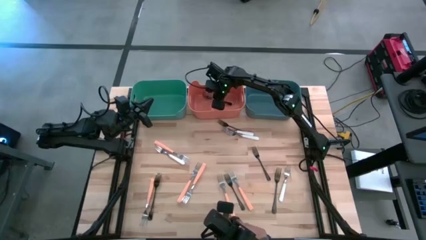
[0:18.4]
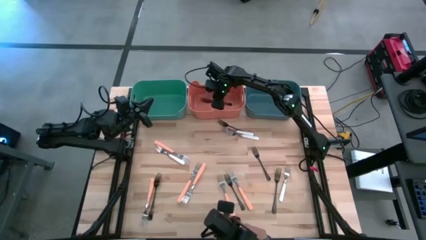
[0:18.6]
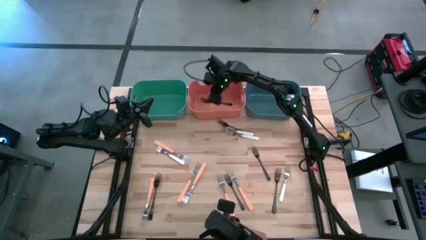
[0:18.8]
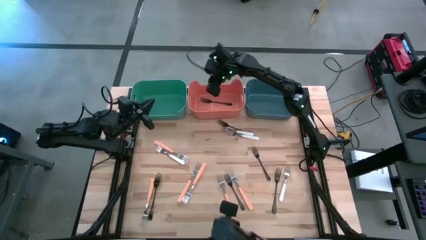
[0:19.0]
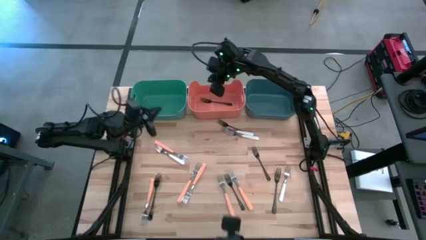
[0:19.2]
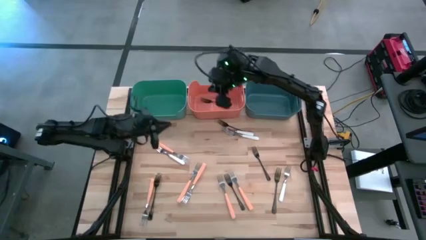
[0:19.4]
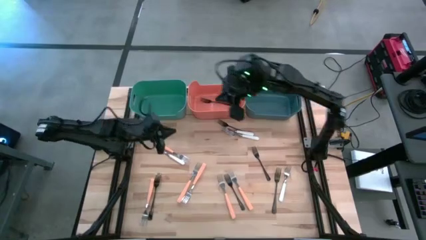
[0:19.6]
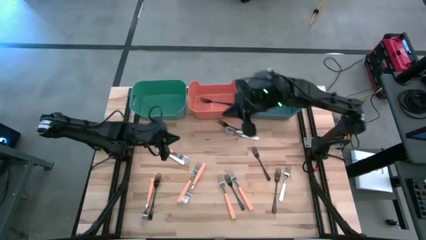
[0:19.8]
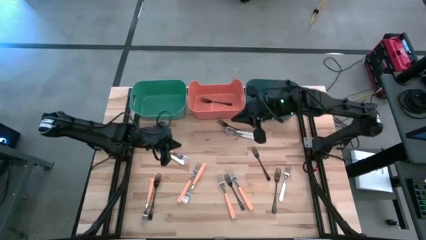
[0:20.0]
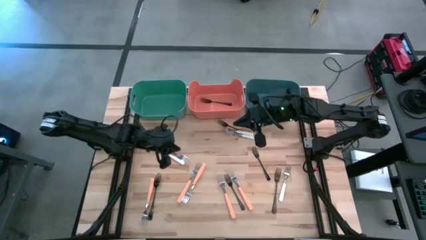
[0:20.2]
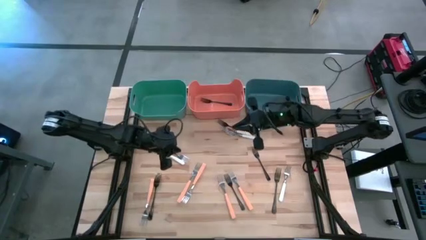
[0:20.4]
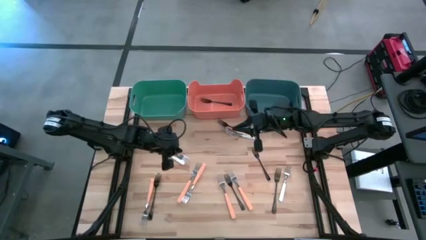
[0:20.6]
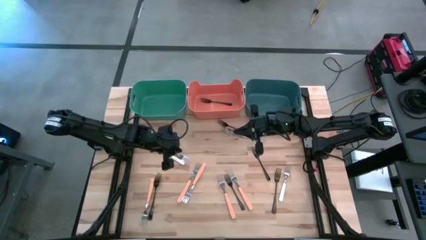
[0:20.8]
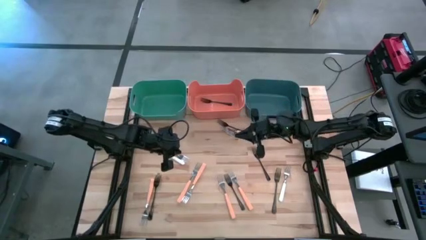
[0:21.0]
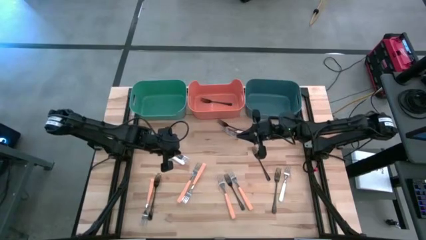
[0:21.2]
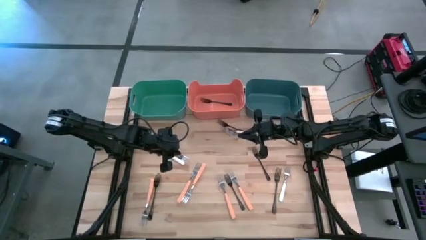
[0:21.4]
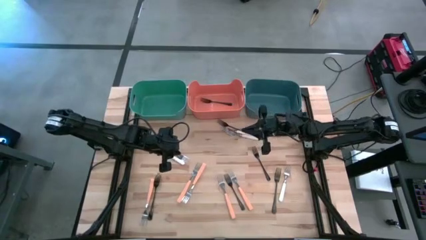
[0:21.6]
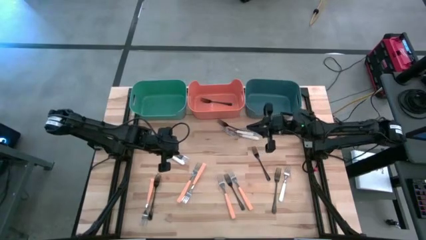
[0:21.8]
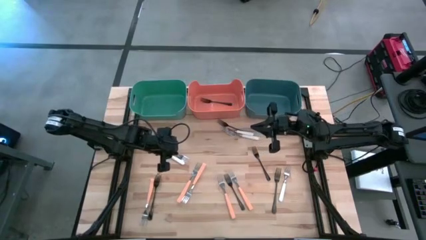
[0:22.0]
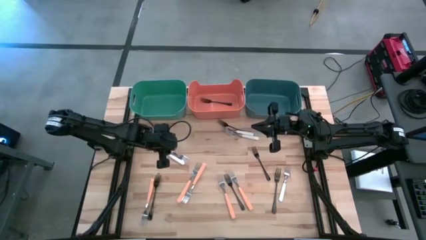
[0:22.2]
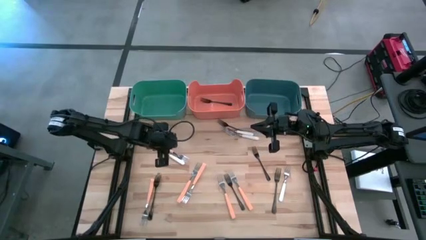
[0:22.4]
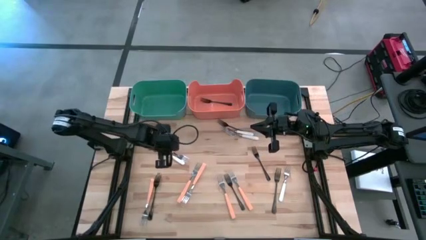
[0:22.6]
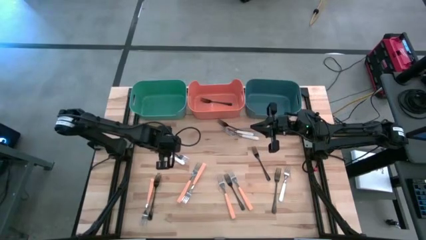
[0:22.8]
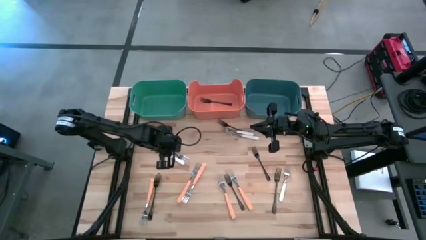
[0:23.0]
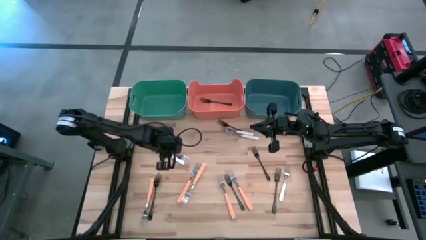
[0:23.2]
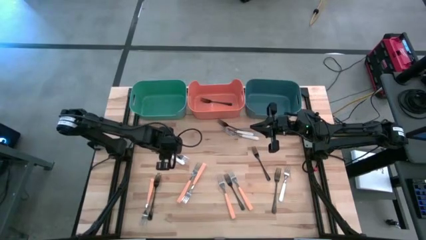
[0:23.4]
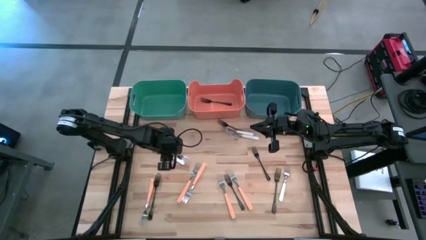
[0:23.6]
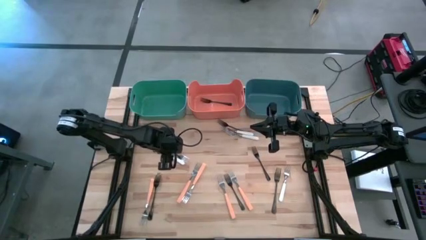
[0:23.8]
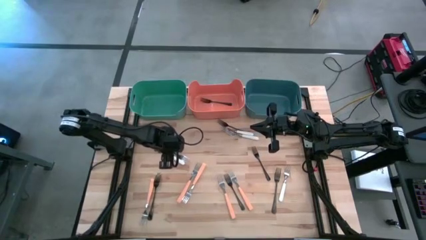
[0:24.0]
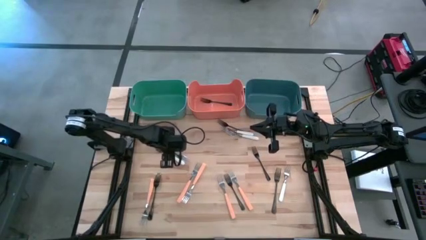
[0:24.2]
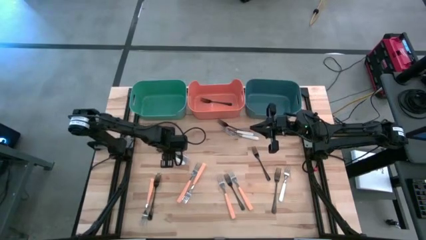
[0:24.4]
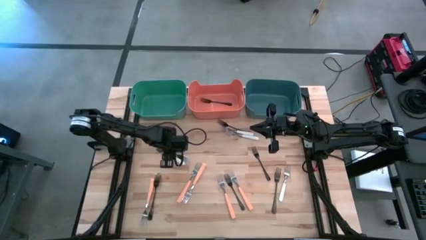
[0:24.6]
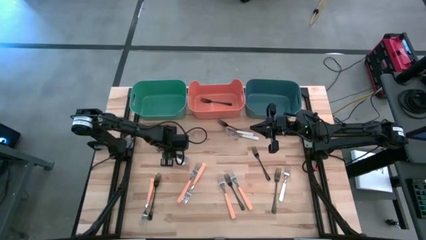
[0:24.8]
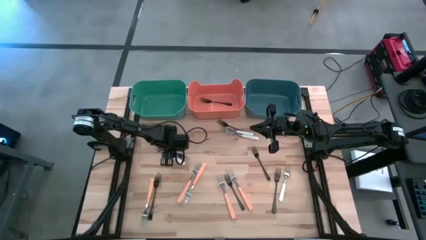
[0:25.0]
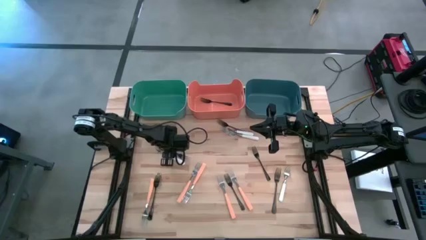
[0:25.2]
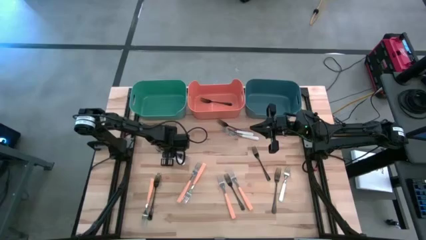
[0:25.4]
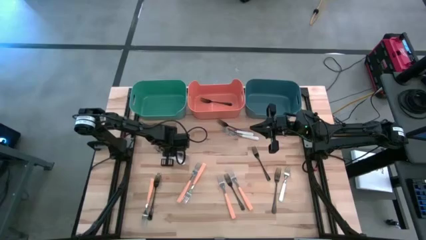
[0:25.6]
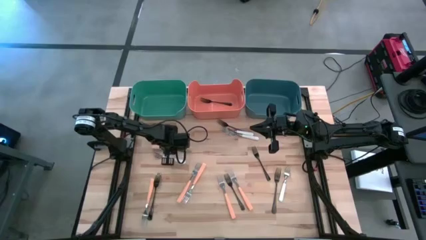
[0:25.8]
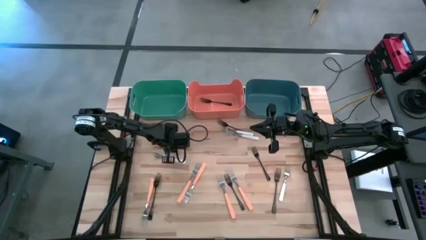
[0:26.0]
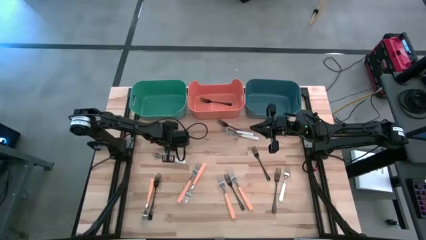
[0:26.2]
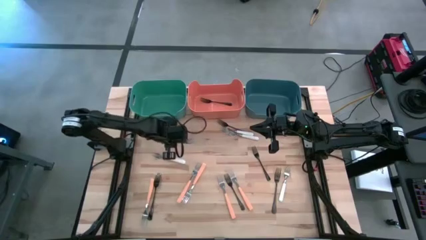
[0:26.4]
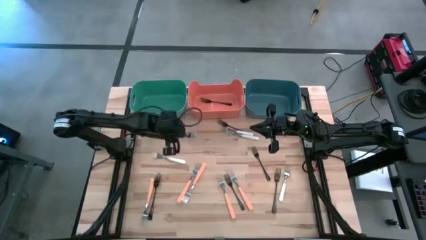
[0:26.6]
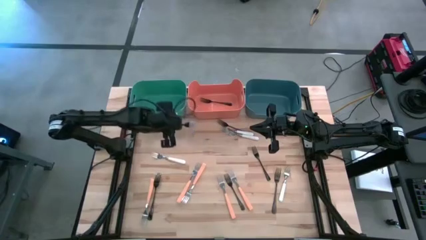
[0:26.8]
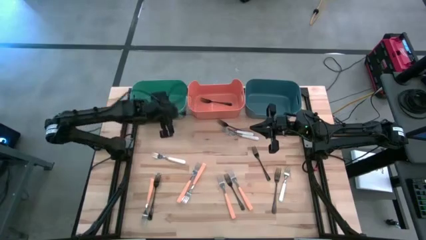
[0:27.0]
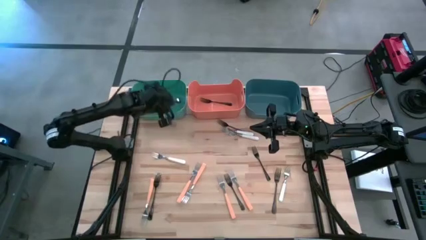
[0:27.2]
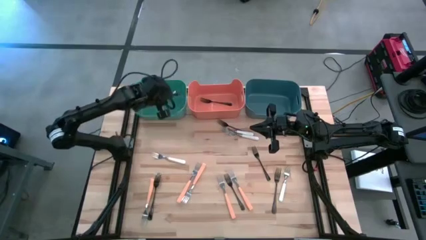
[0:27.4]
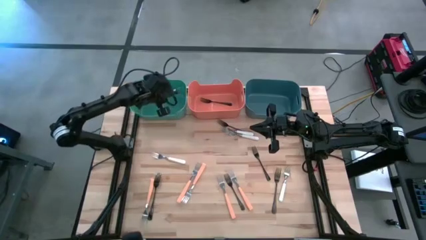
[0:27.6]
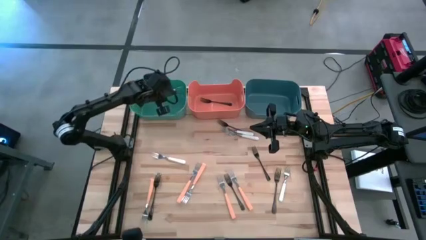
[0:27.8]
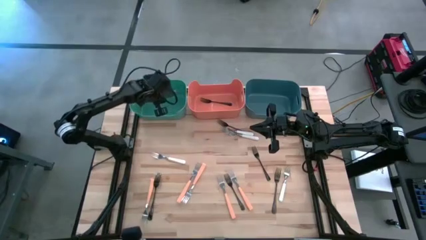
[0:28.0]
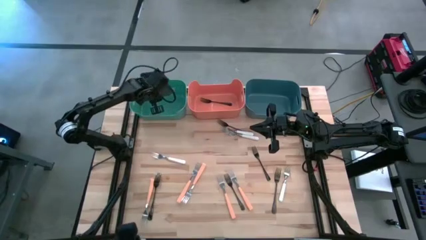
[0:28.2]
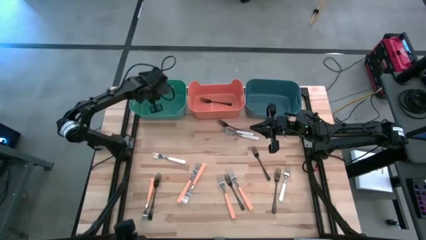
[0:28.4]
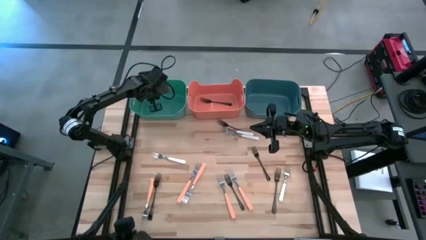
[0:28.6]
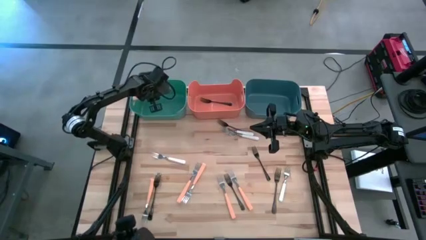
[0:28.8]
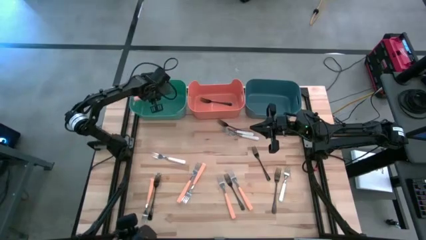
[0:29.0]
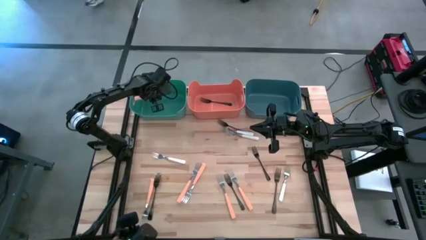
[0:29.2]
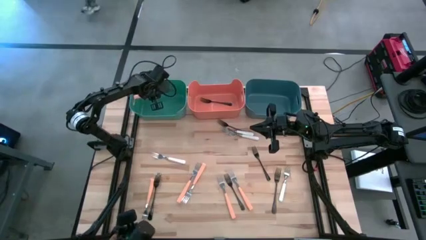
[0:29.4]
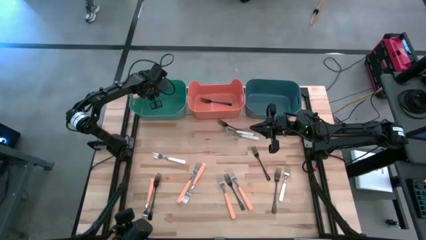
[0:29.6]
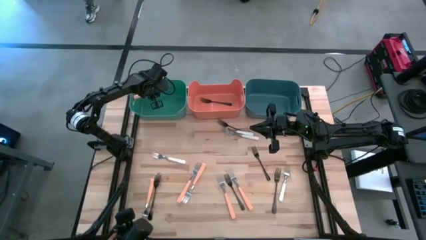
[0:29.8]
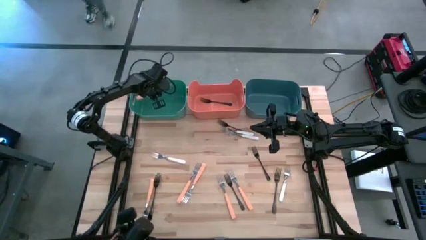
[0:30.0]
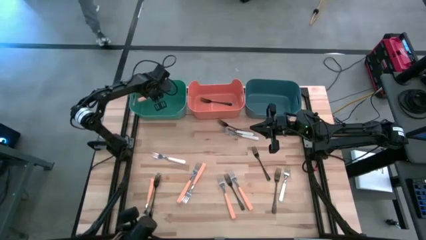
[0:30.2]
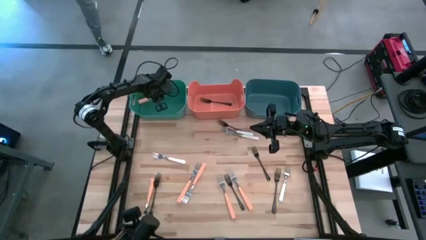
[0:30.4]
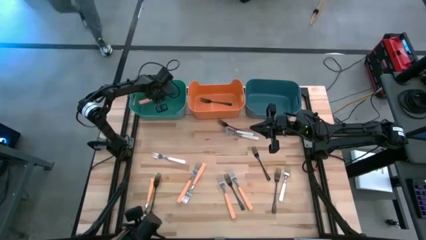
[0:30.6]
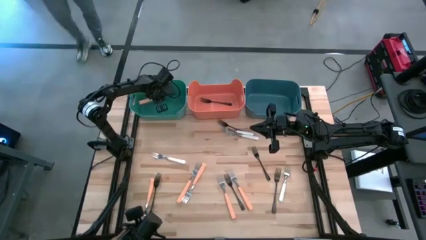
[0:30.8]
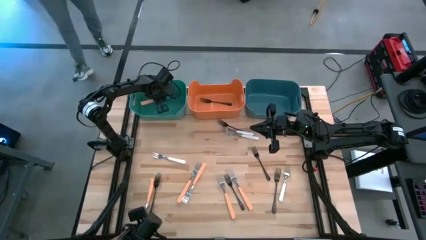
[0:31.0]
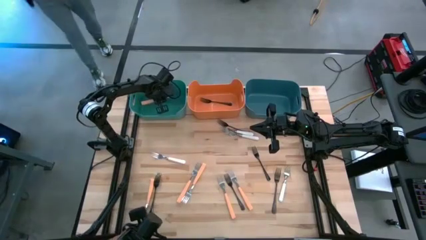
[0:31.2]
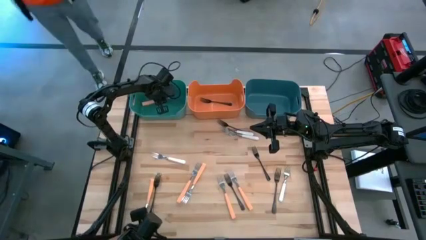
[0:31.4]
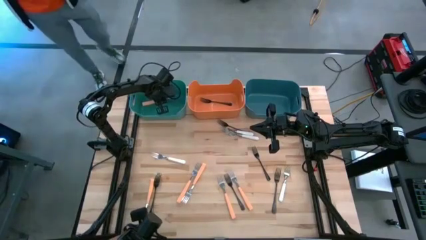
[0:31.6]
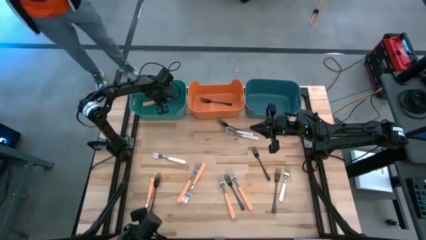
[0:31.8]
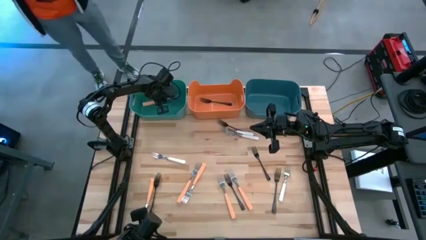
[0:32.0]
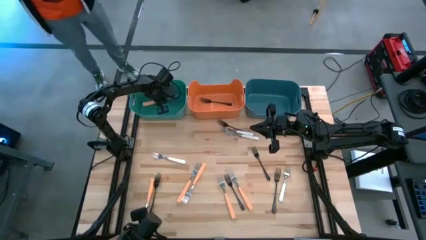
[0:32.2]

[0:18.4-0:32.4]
Task: Sort silverware by color (type)
Put the orange fork into the green bin

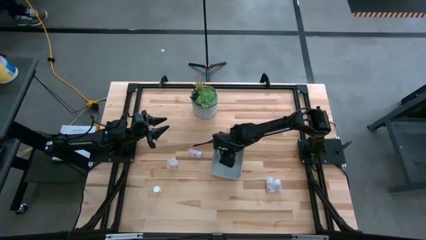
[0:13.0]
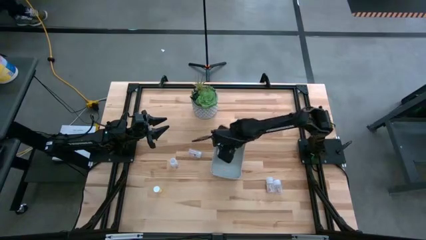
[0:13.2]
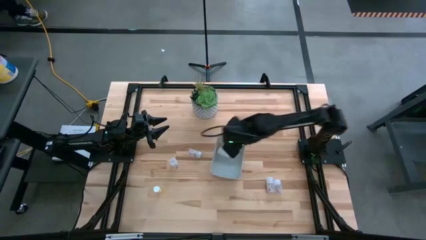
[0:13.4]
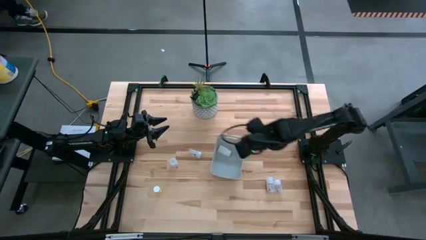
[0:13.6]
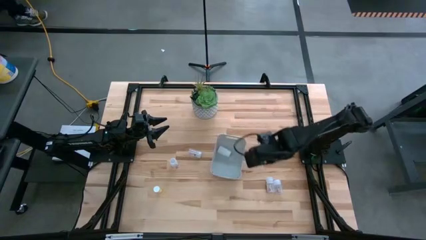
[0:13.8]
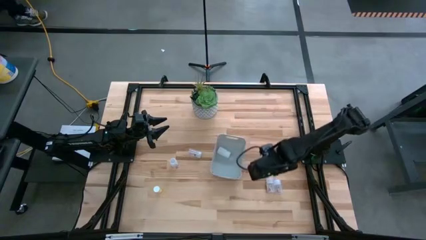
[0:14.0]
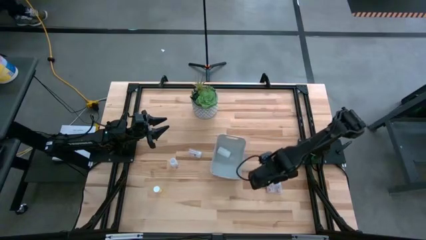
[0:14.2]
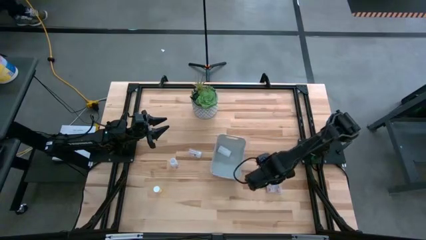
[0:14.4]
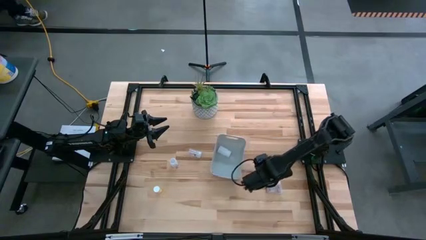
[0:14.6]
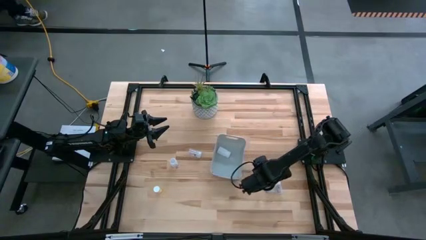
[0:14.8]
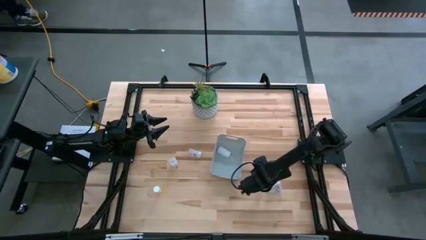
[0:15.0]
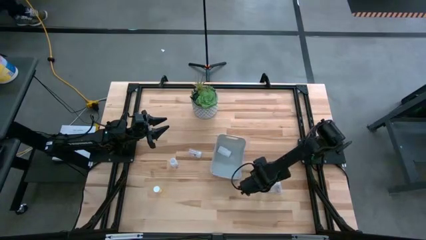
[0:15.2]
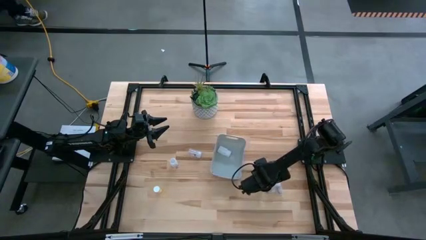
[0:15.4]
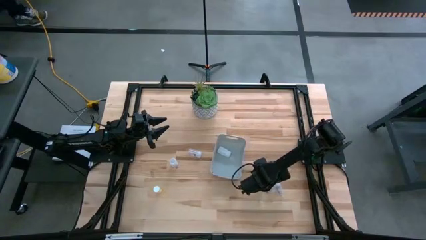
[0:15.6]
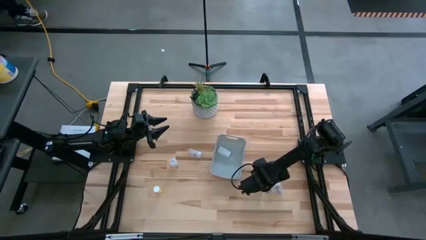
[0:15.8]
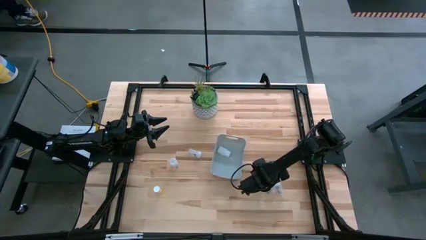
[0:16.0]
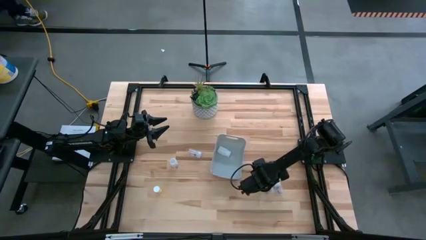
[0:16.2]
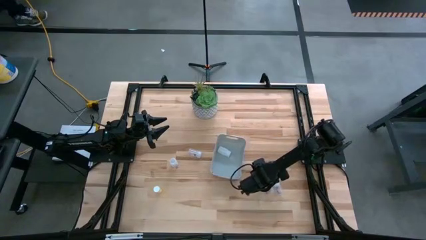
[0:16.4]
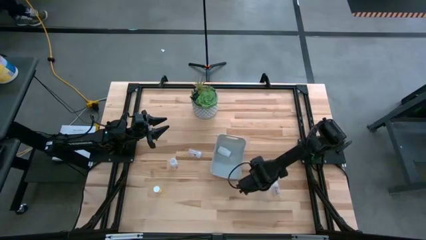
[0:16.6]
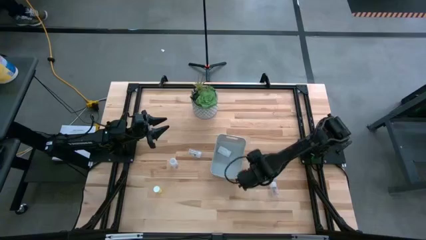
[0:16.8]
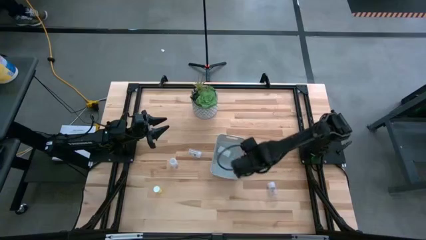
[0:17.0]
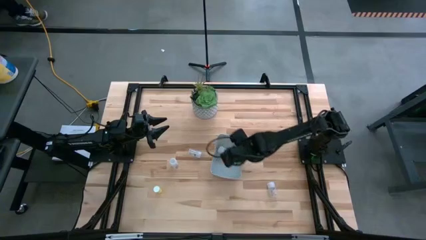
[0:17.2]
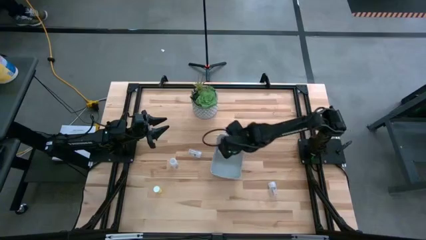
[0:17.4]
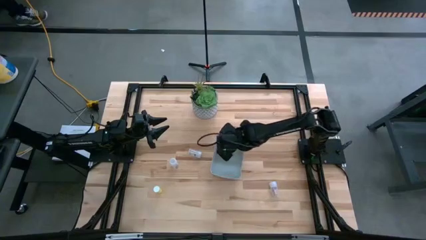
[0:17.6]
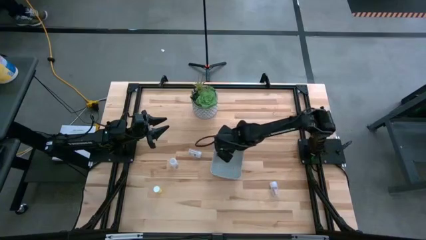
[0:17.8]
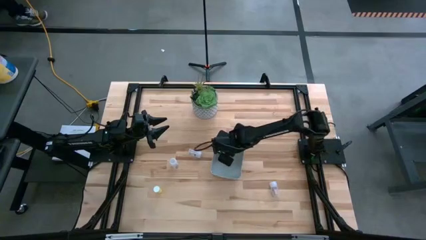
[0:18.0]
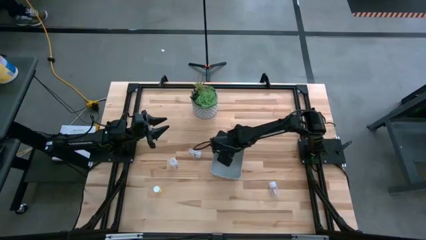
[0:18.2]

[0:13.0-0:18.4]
Task: Pick and place pill bottles into a basket
Put the transparent medicine bottle into the white bin
